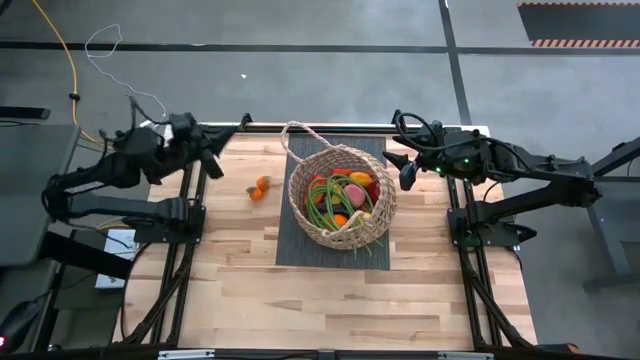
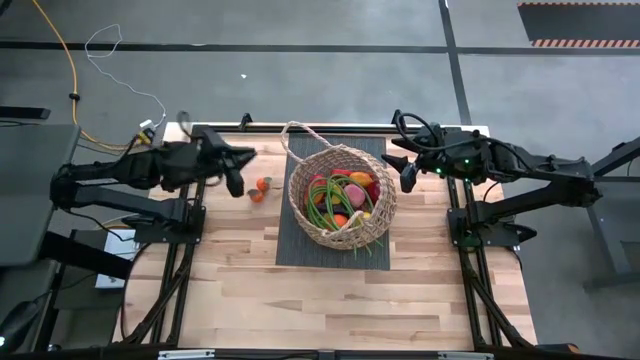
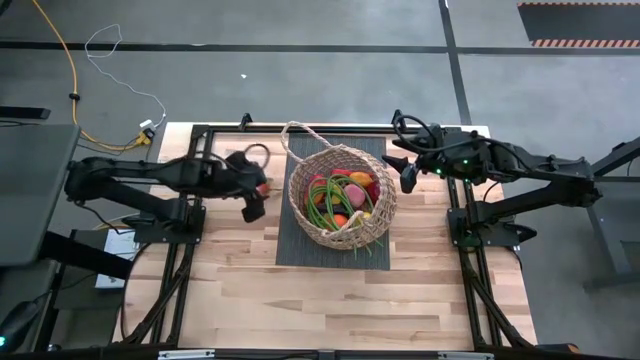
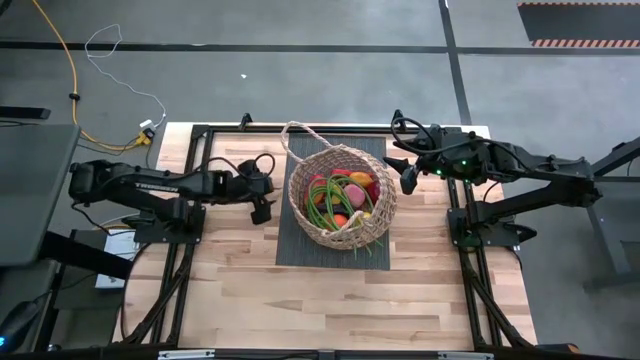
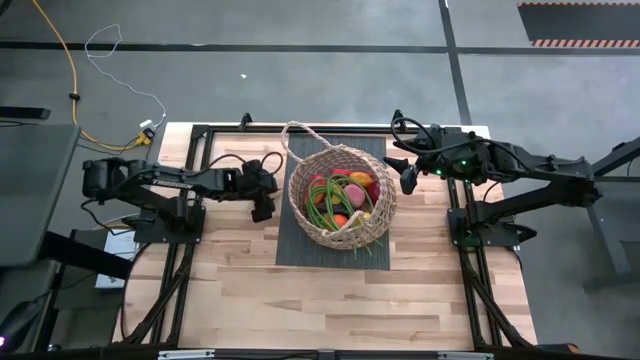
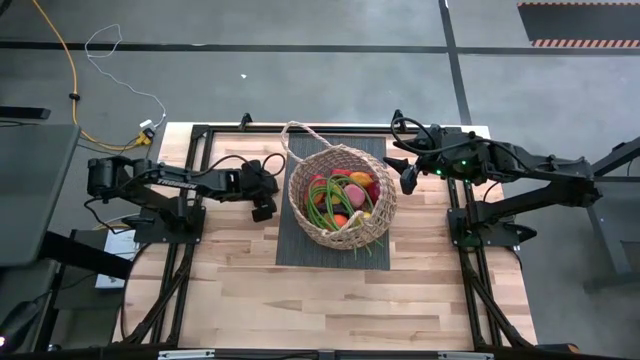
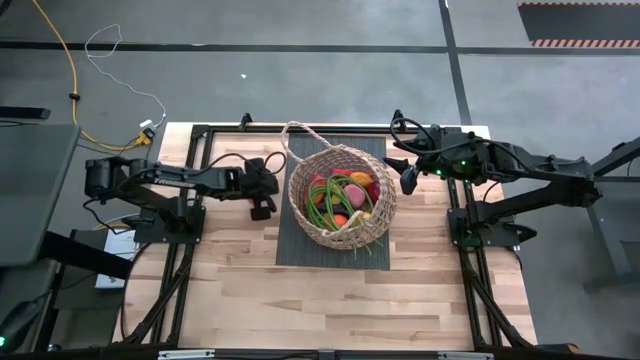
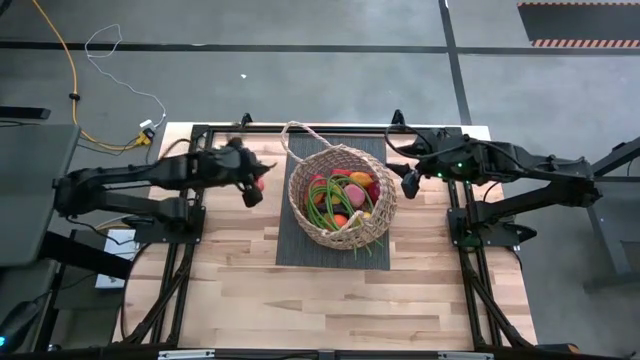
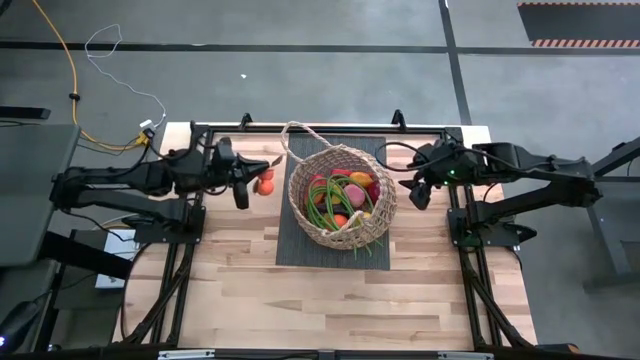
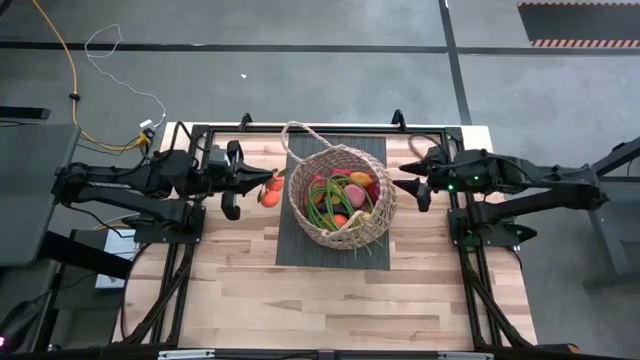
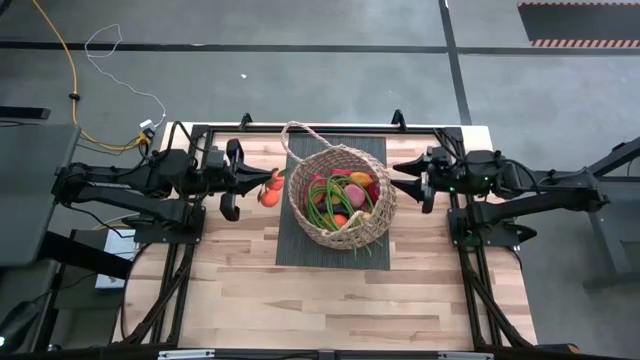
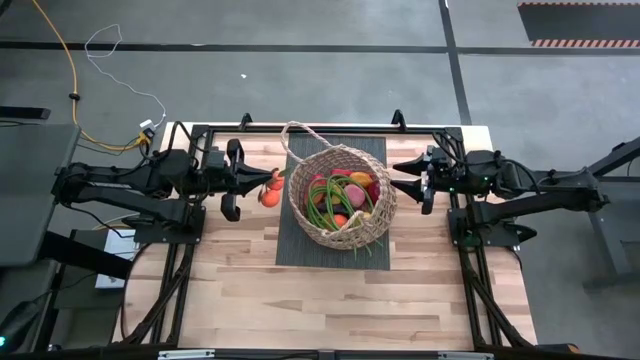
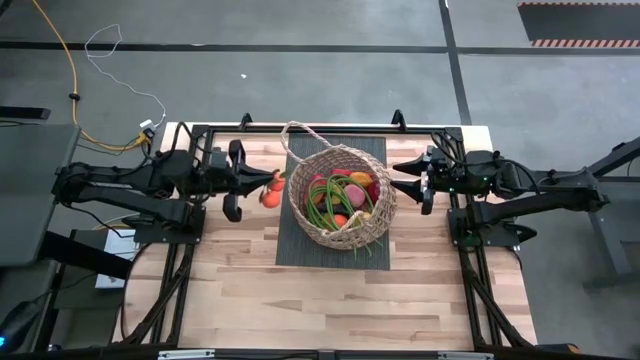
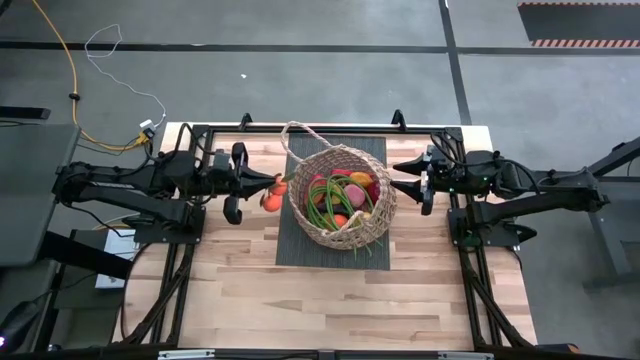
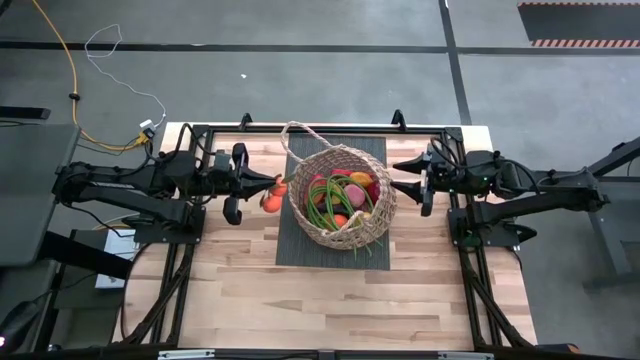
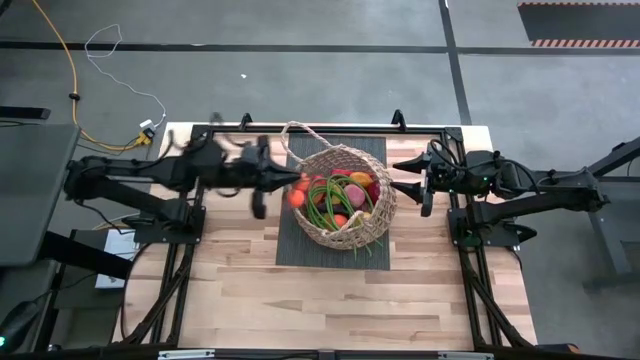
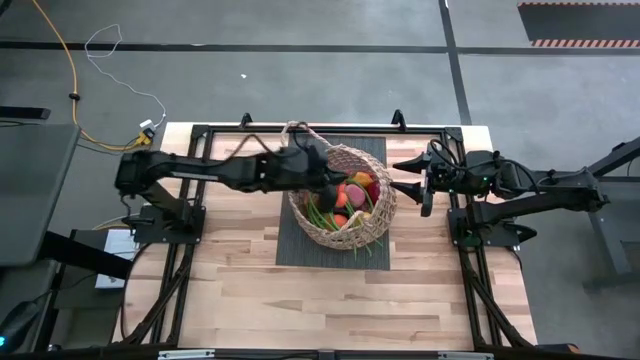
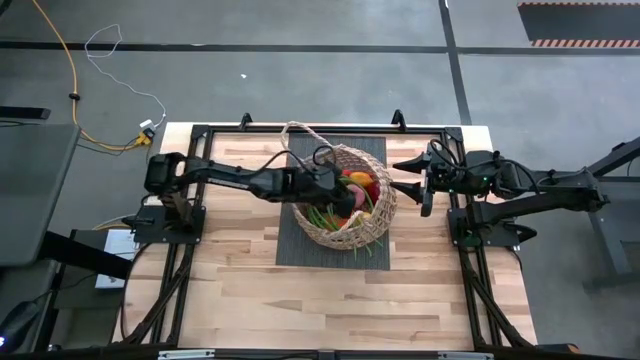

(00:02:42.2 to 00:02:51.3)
Task: Build produce basket
Put the tangerine into the woven basket

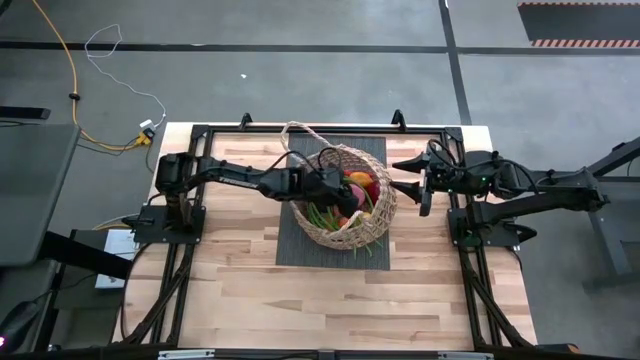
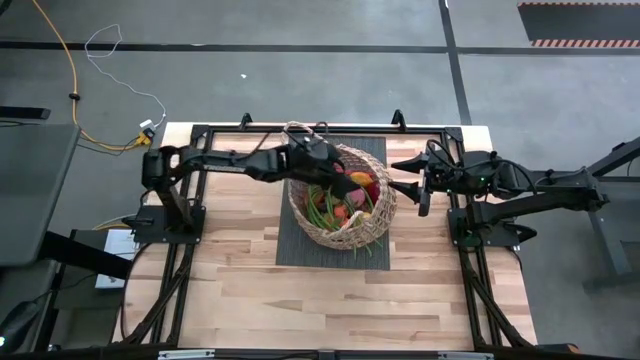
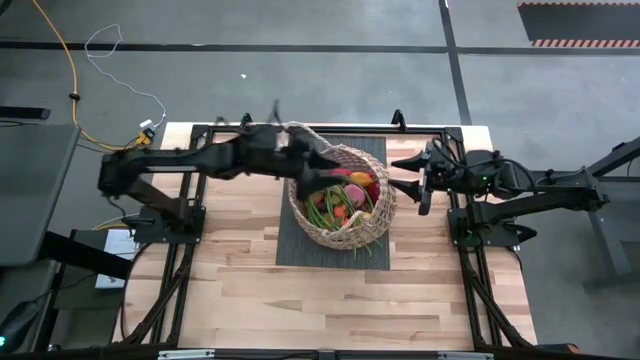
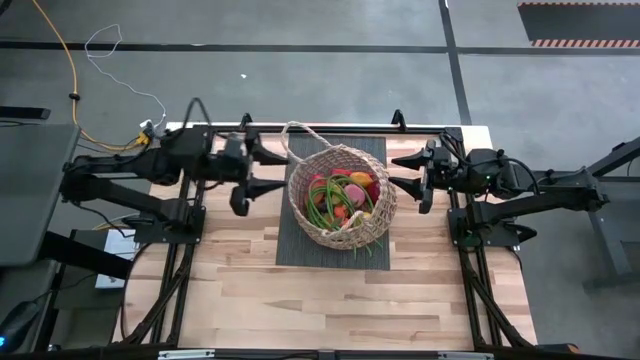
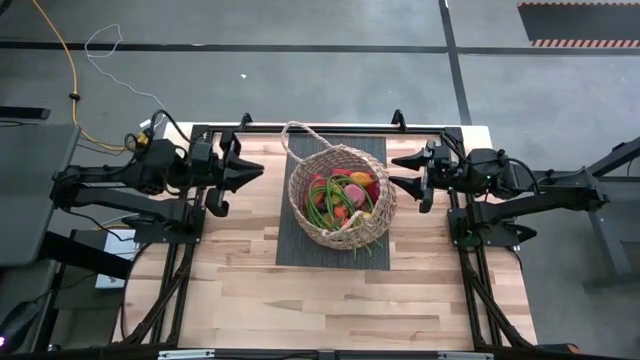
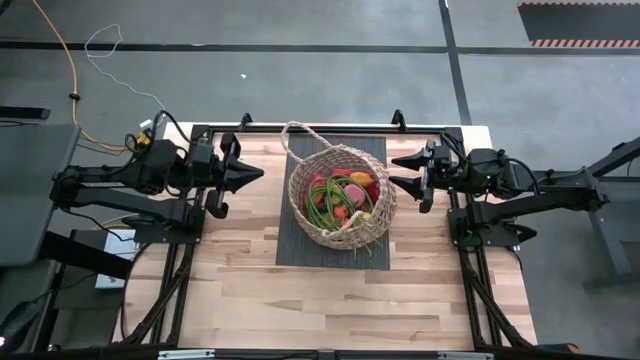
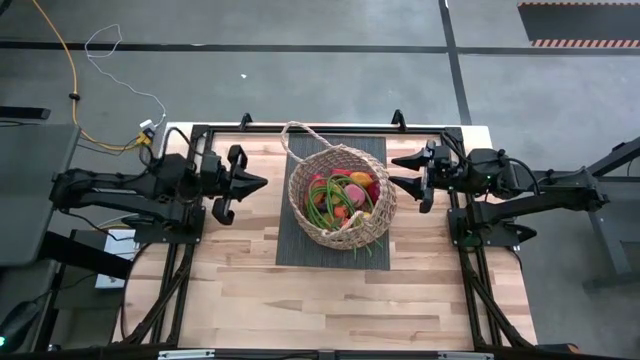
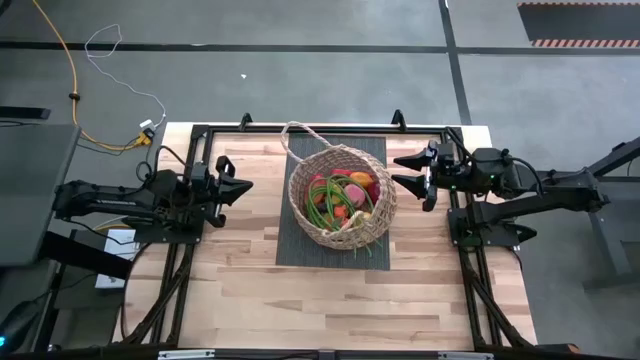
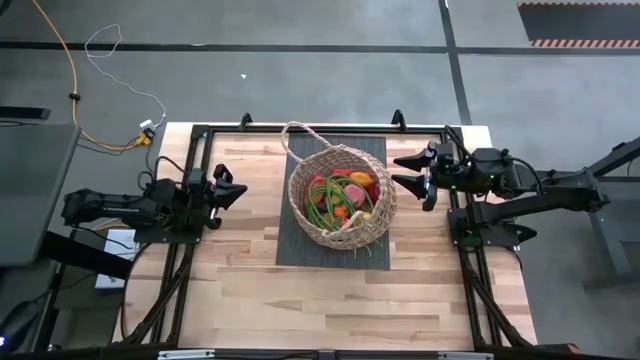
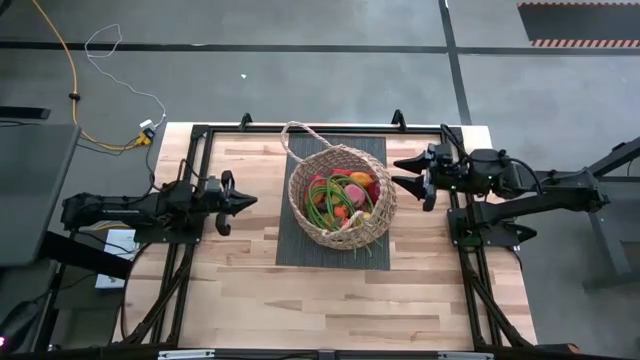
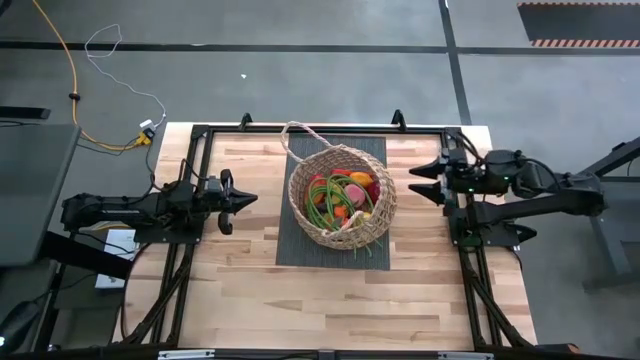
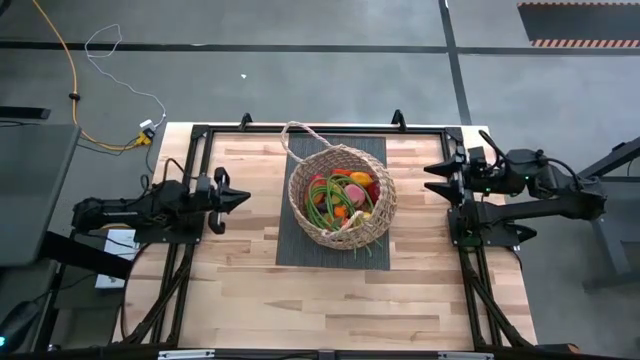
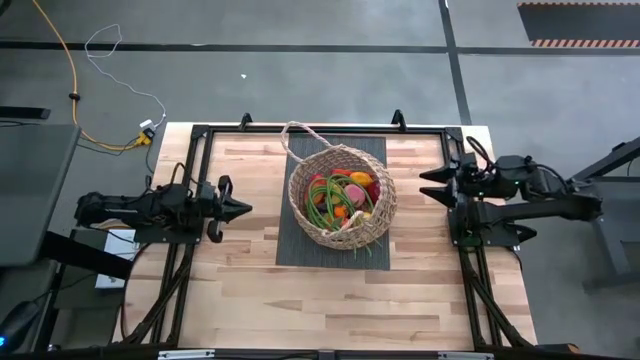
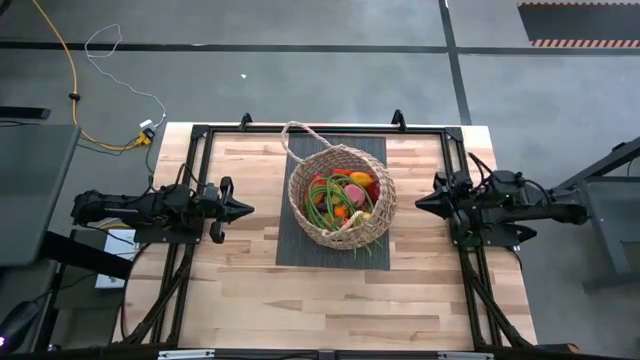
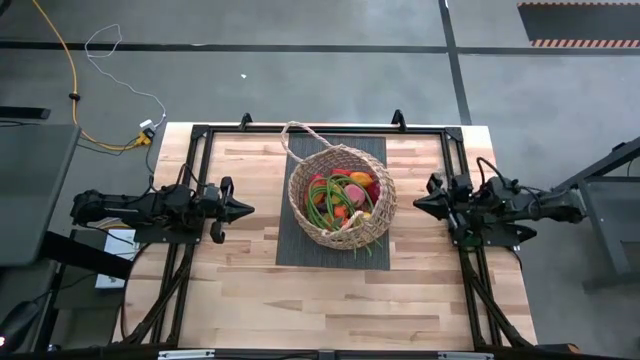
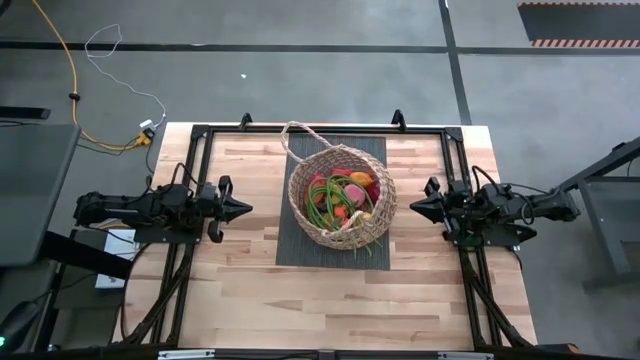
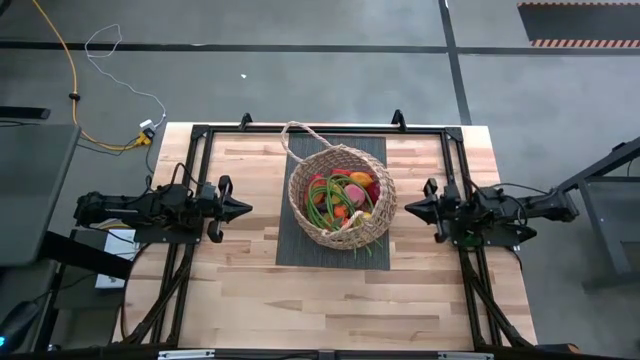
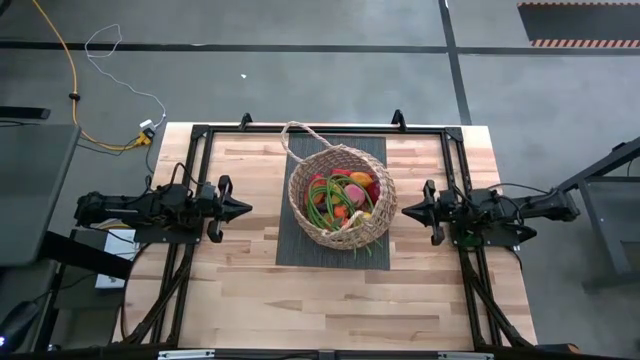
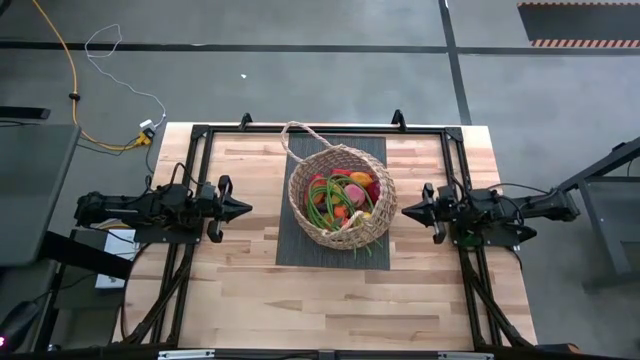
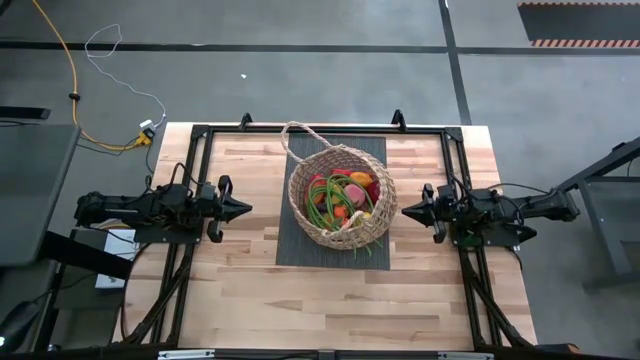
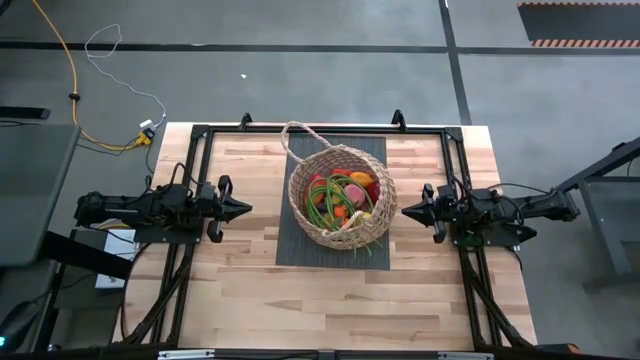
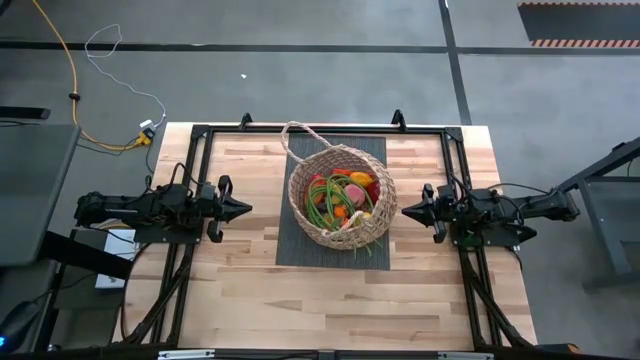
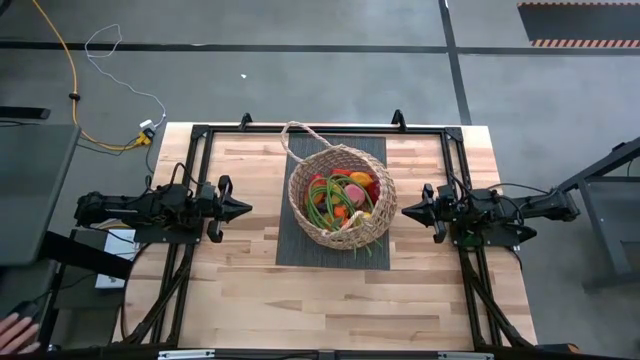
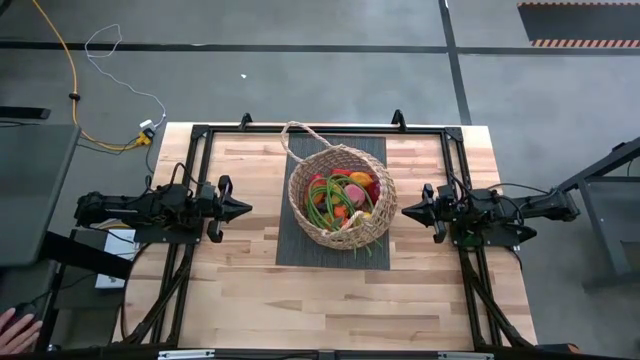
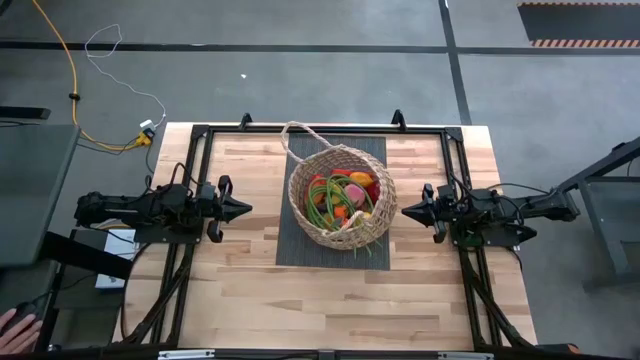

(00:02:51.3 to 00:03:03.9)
Return to Home Position
